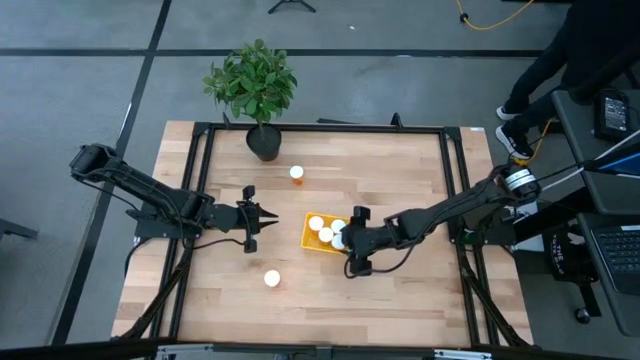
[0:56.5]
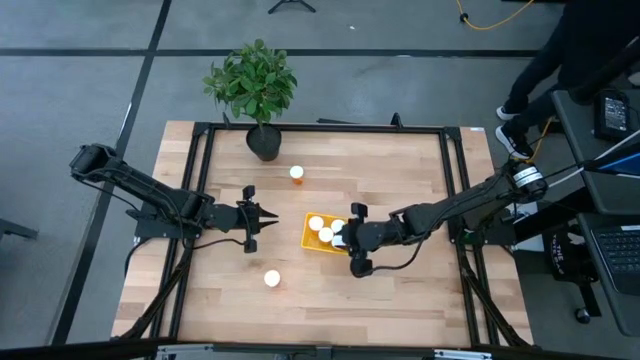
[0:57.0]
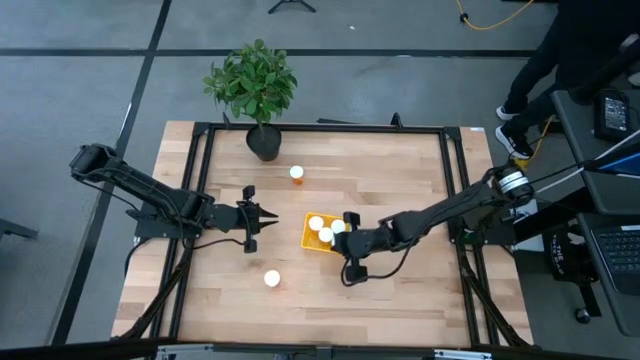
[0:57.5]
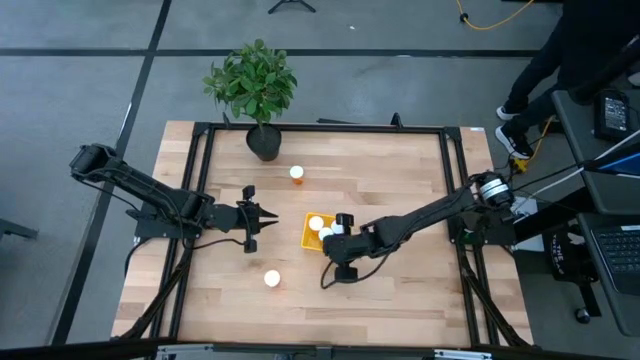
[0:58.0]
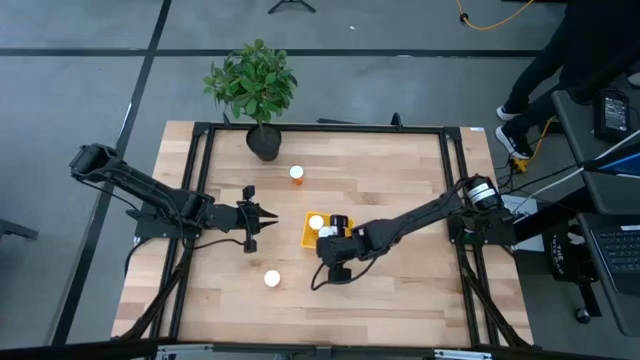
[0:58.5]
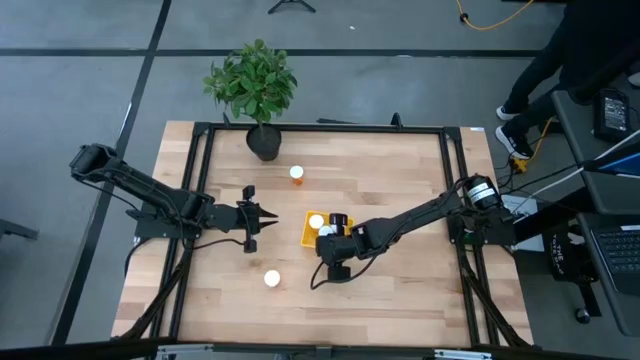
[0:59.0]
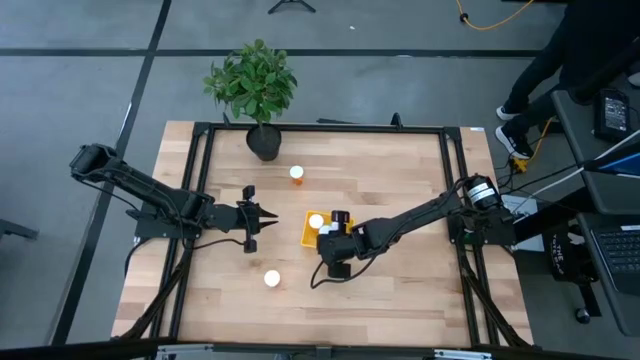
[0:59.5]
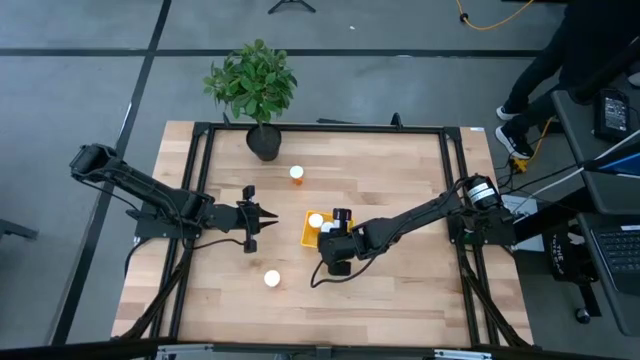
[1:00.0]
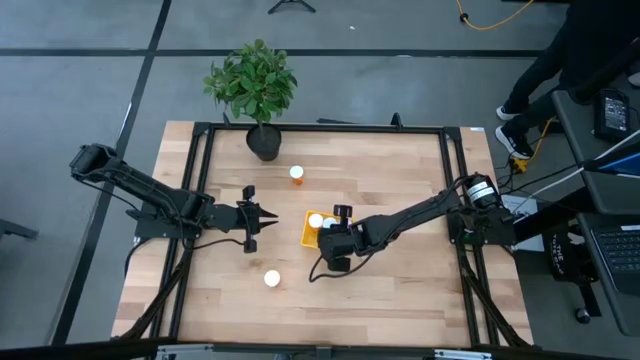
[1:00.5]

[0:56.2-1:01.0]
Task: Pick and place pill bottles into a basket
Adjust the orange pill bottle in the yellow bin

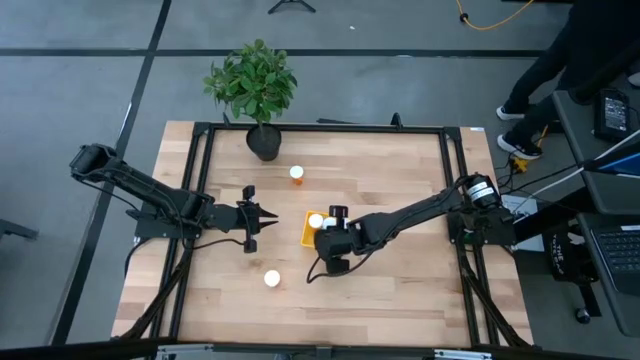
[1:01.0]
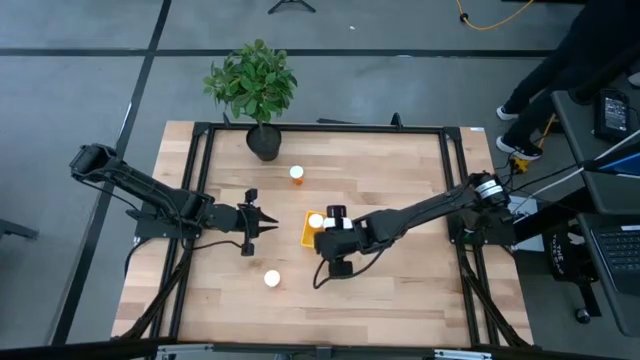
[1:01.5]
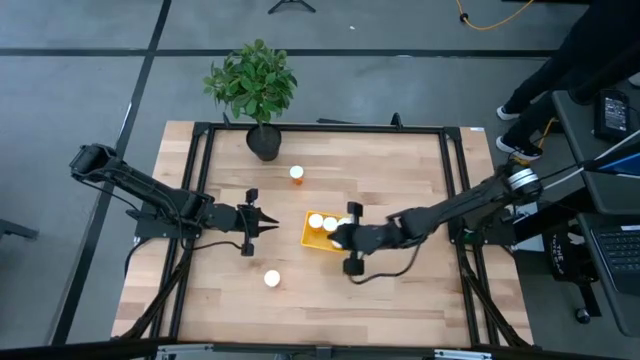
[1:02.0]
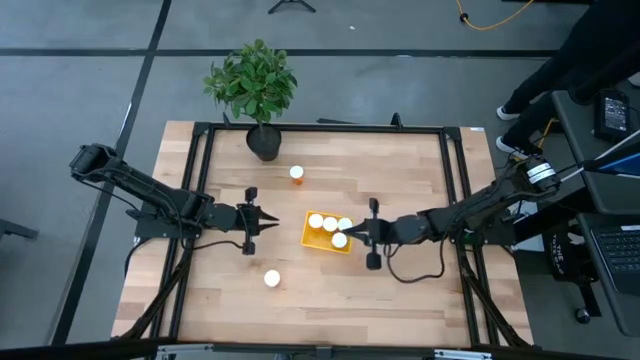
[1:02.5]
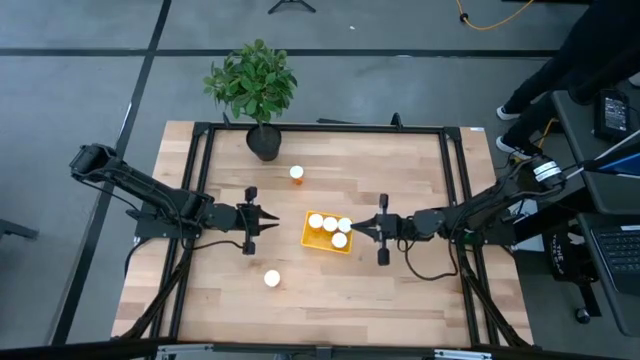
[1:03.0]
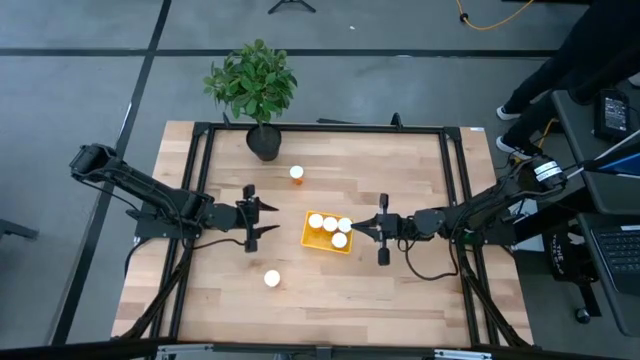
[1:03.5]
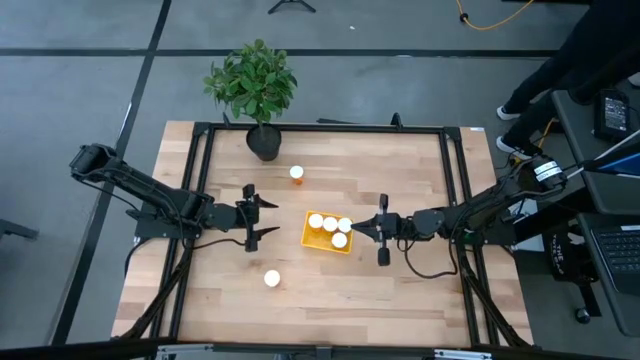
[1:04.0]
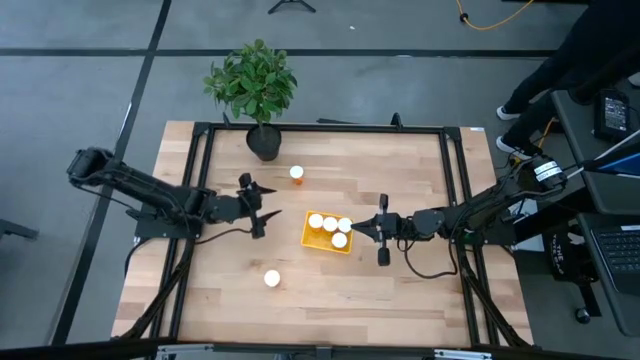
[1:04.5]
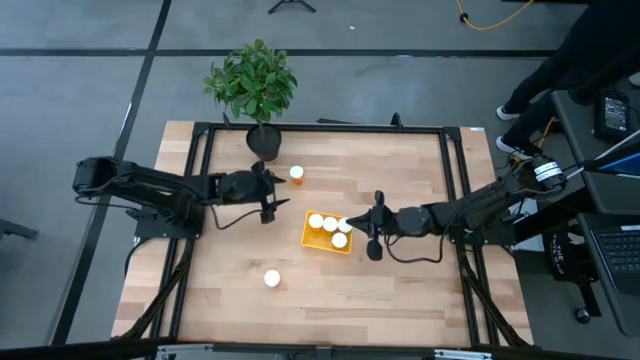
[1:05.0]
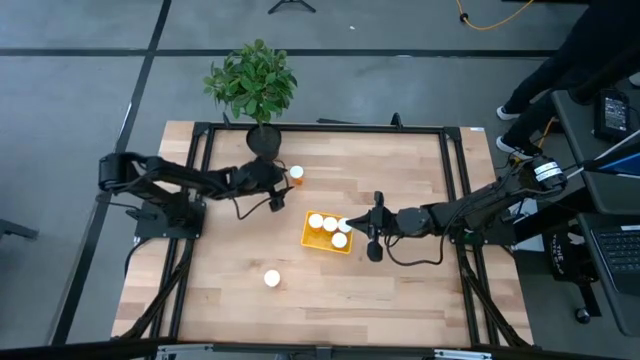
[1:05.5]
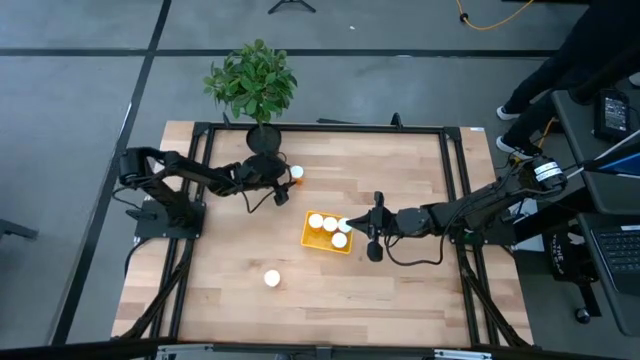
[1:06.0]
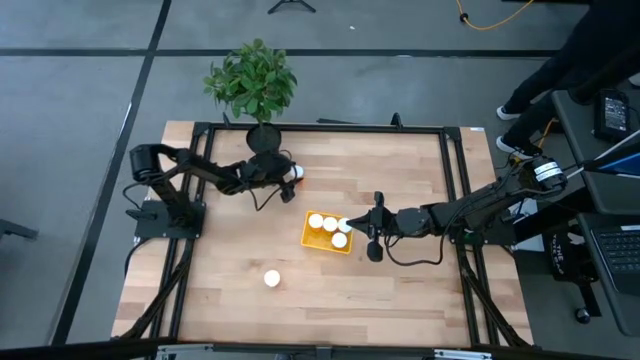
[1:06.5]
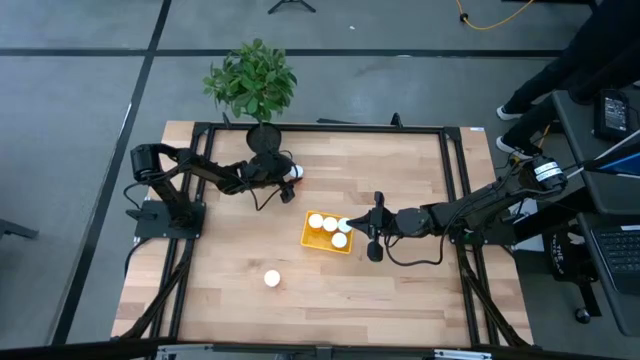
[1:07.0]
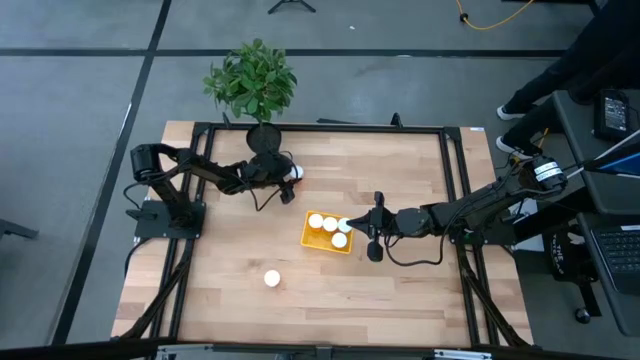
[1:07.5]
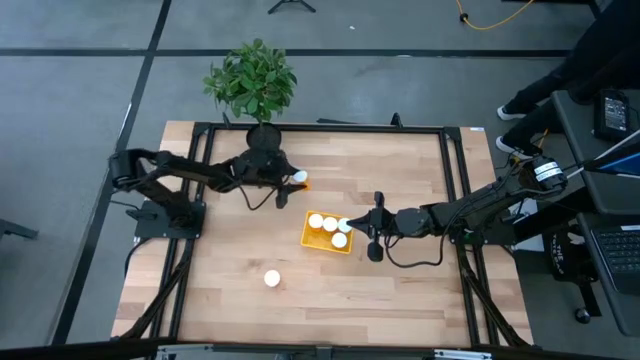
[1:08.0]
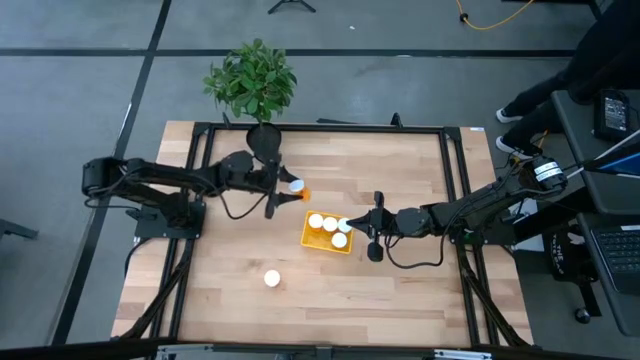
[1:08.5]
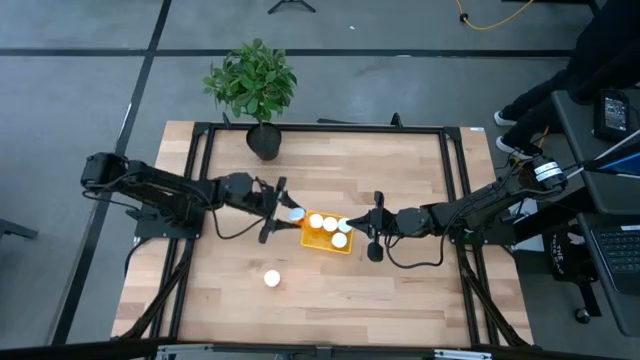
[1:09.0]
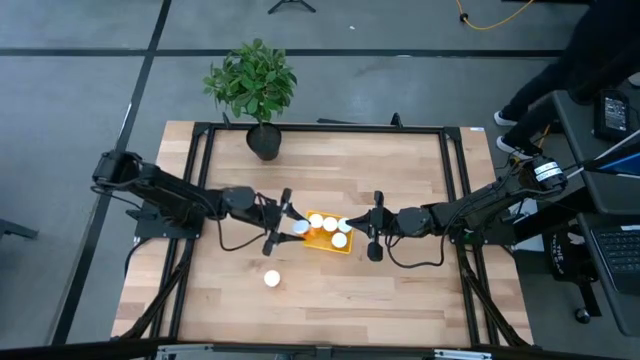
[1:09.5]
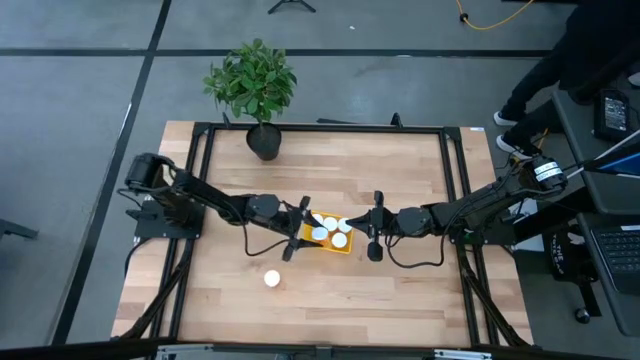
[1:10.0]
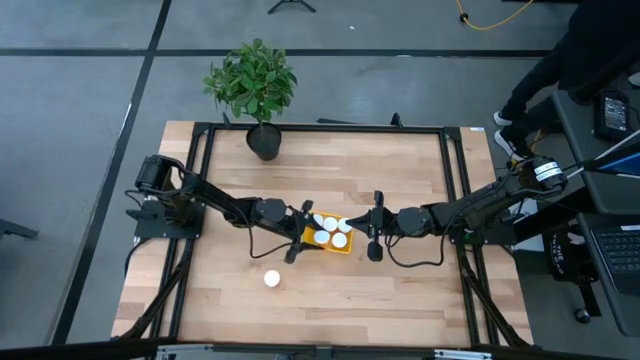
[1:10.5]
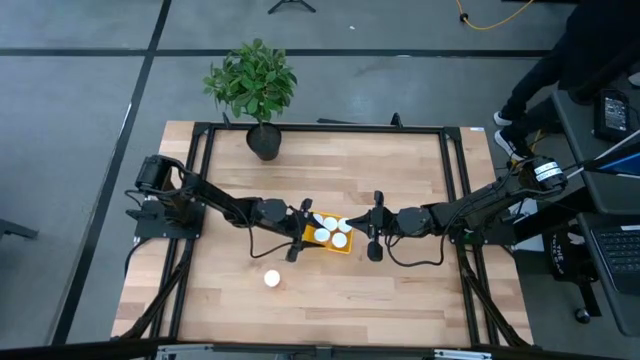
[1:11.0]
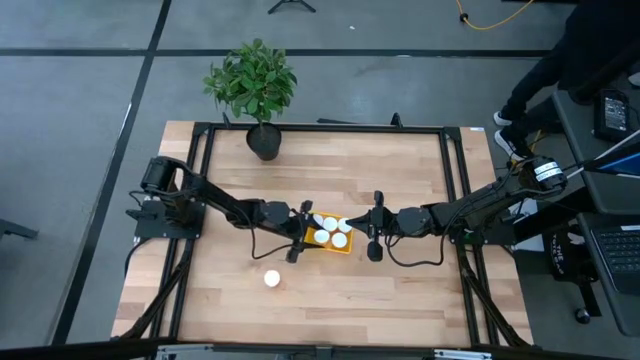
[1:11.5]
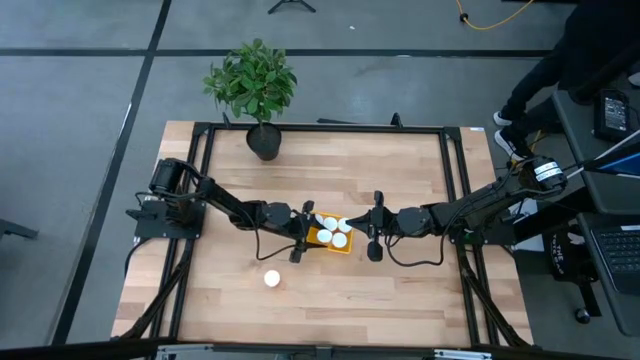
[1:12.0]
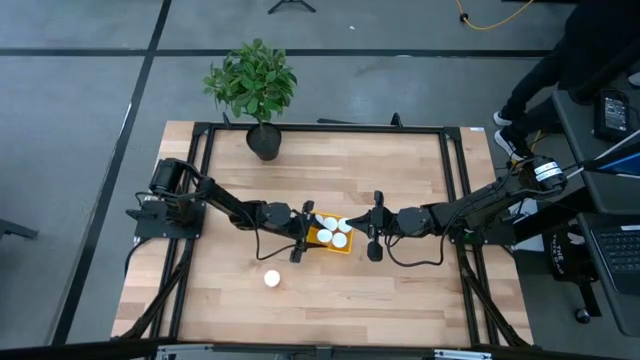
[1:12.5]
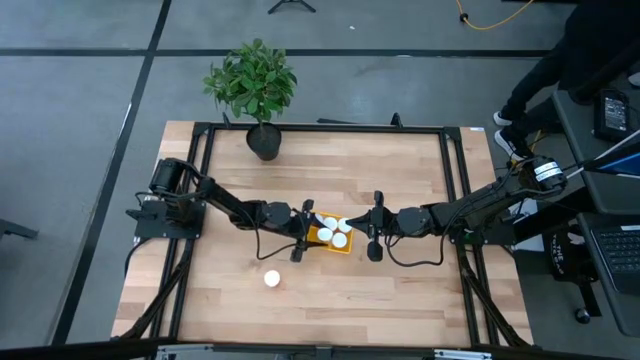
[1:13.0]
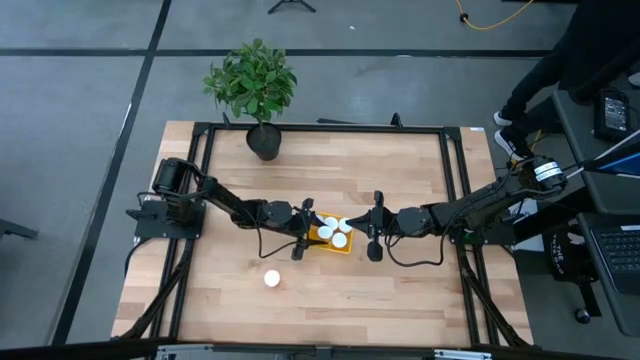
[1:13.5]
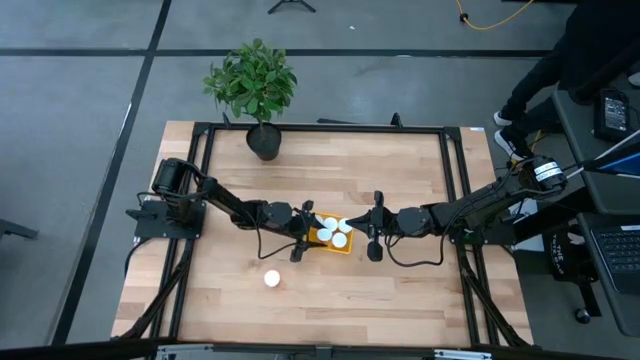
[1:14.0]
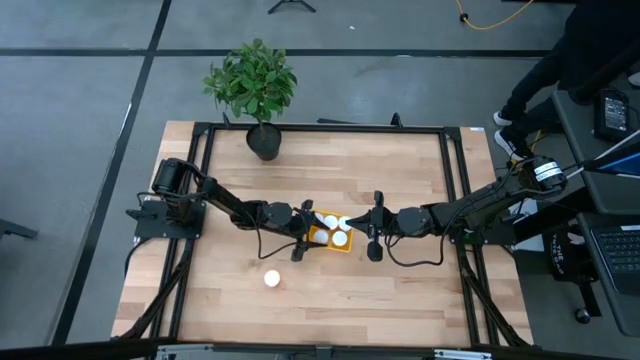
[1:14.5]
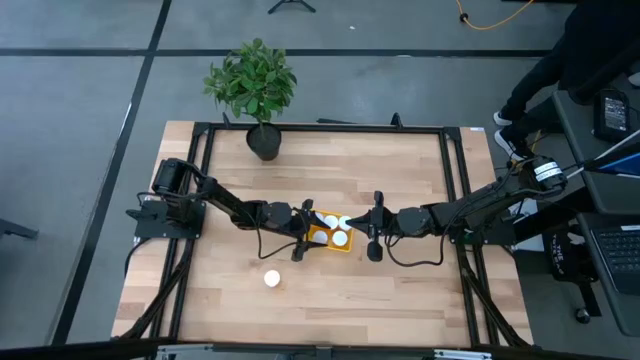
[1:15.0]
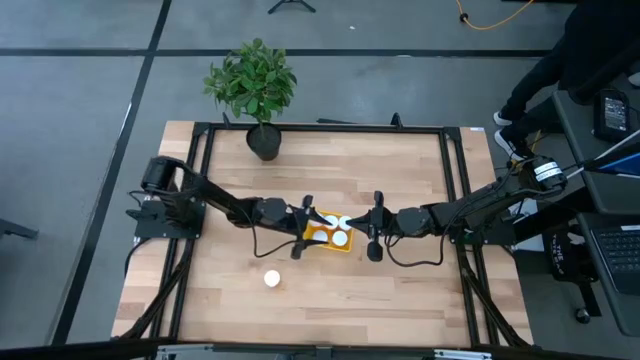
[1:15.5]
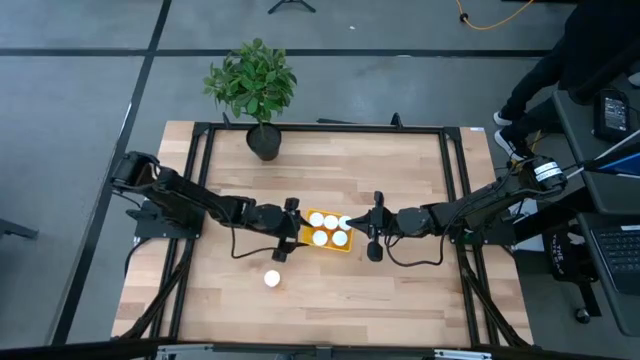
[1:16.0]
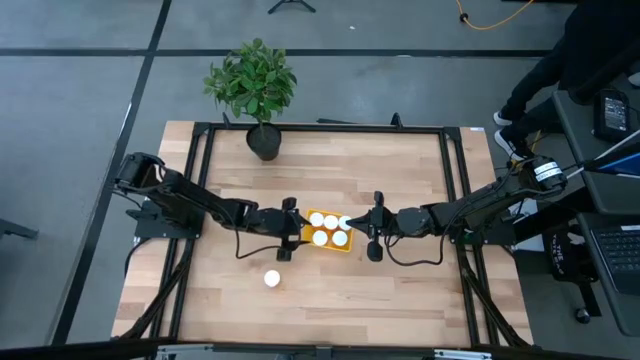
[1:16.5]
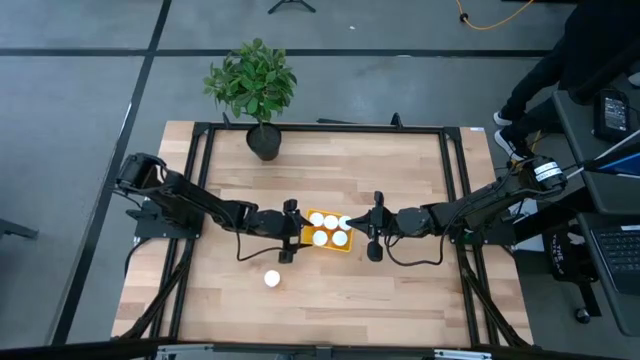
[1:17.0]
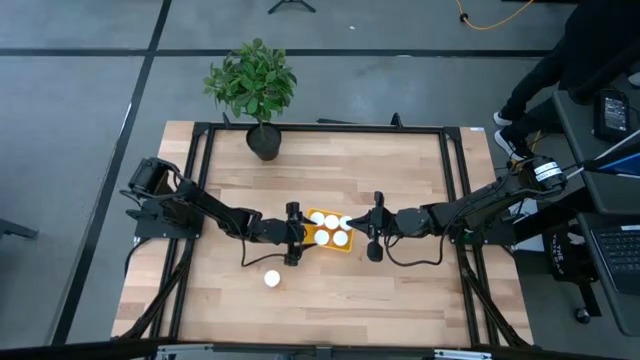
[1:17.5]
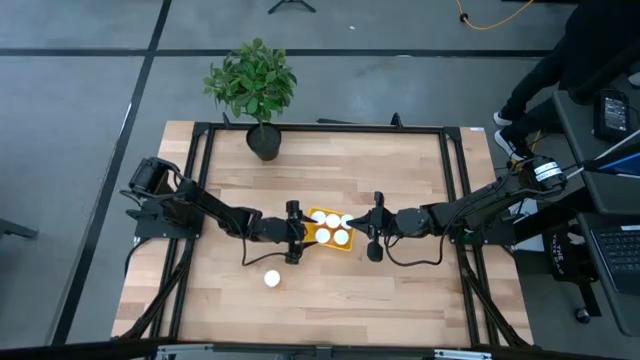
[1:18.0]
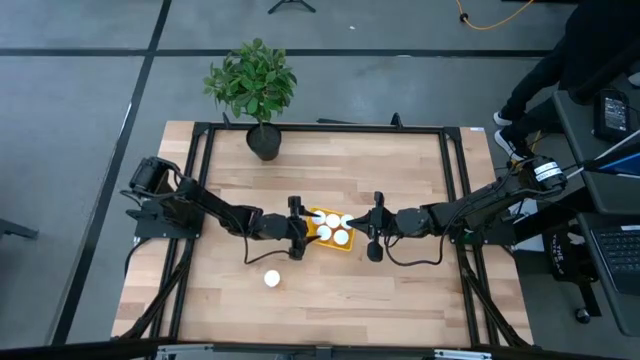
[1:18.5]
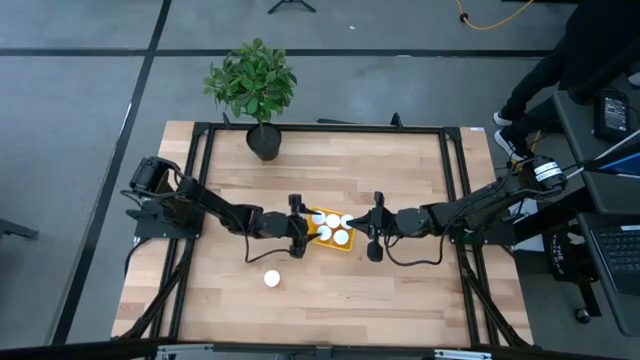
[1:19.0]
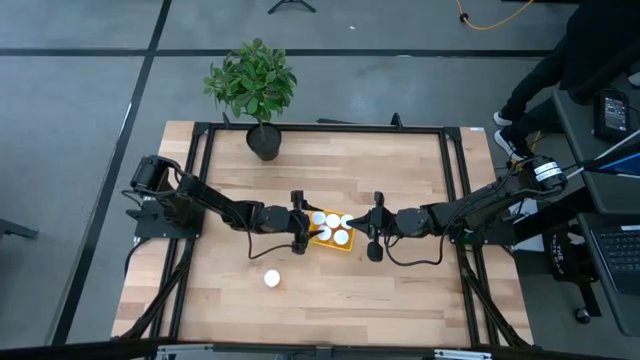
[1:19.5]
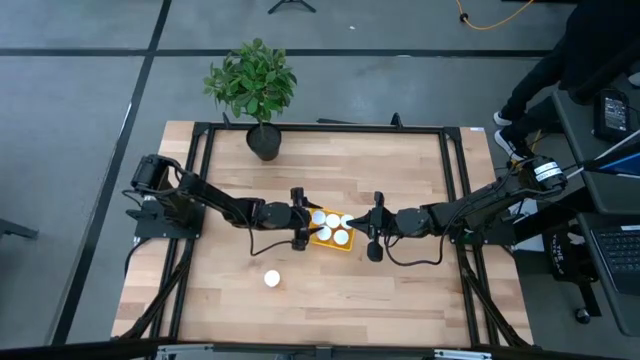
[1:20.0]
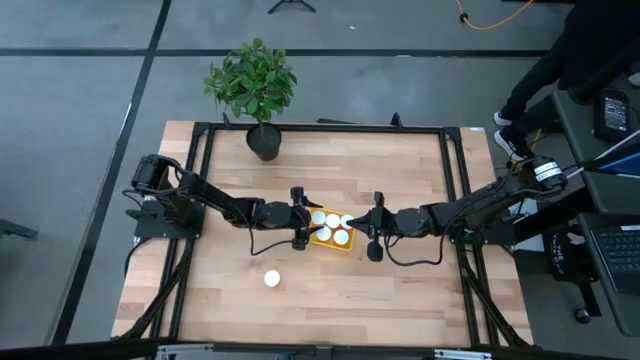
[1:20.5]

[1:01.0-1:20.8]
Put the top orange pill bottle into the yellow bin
